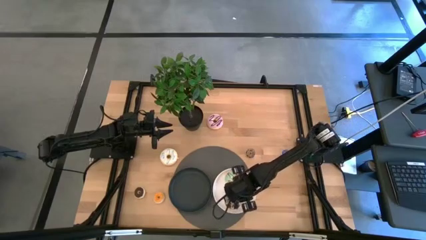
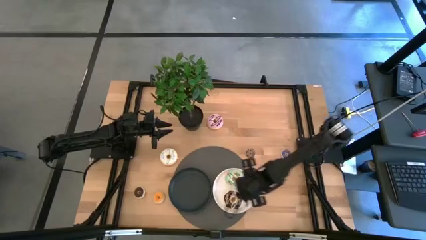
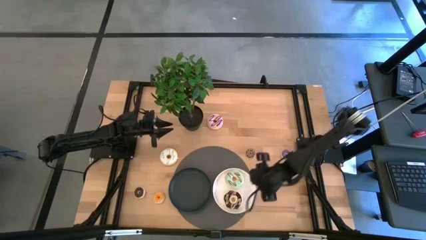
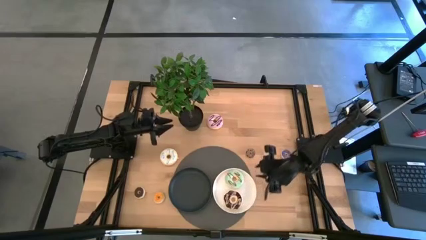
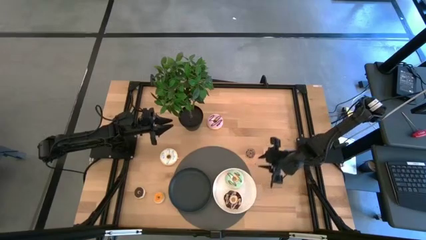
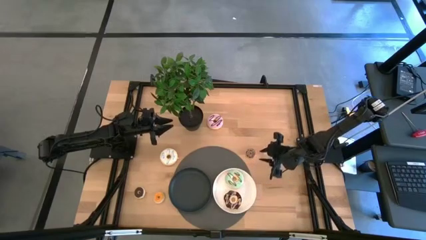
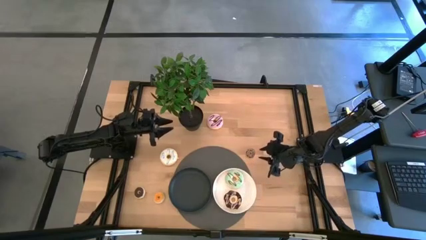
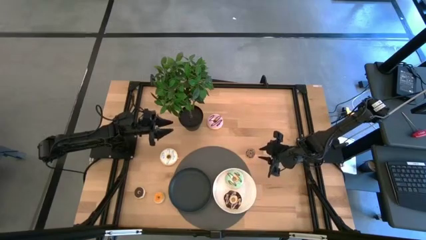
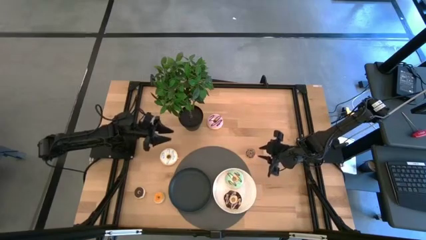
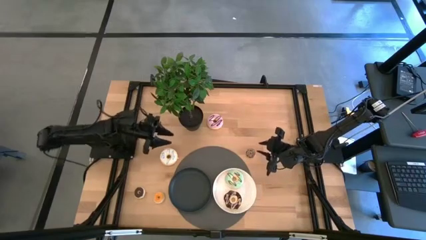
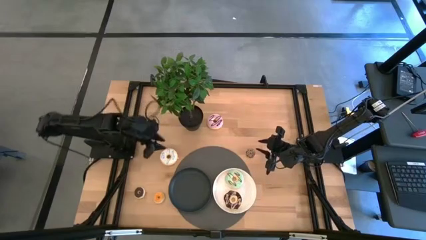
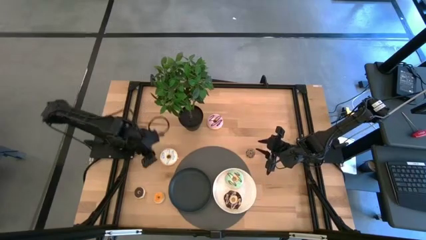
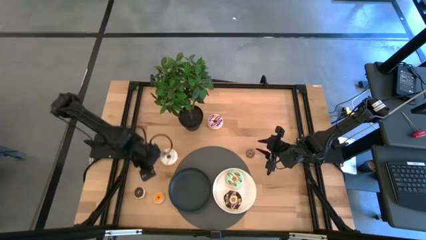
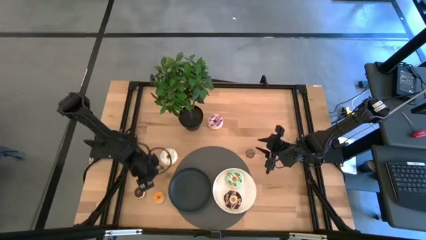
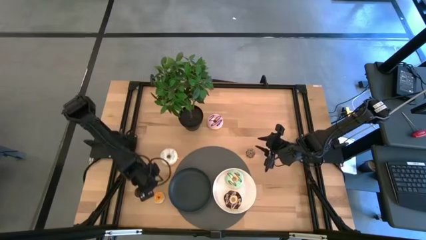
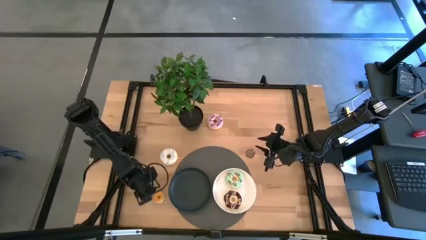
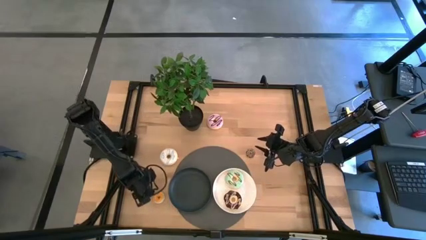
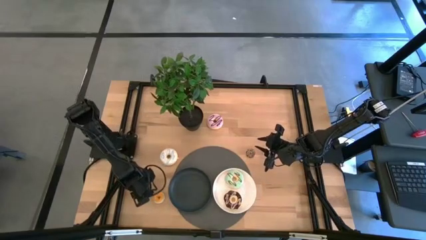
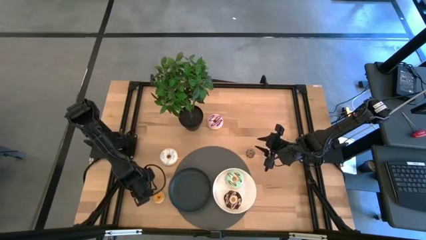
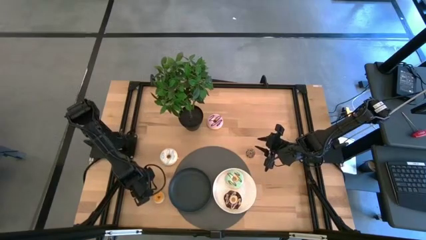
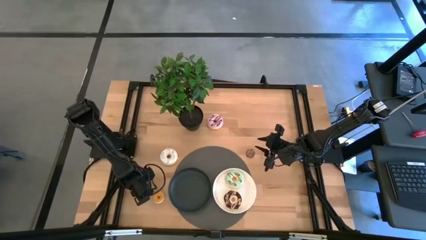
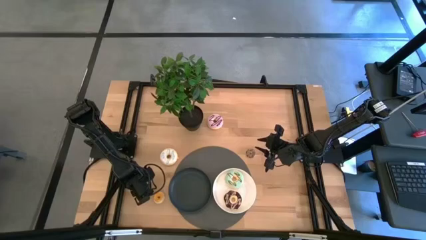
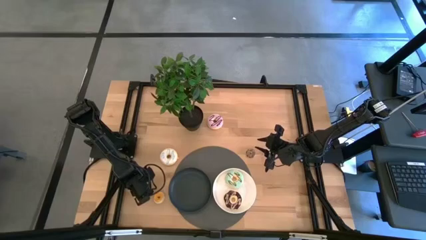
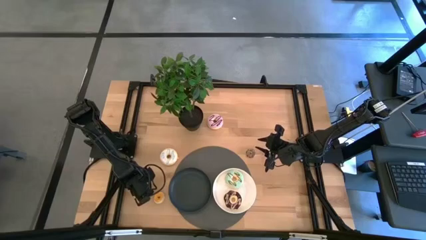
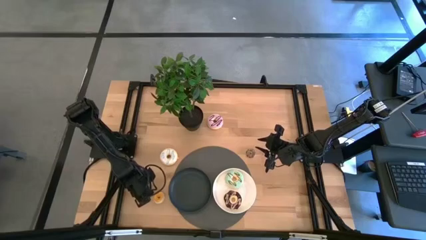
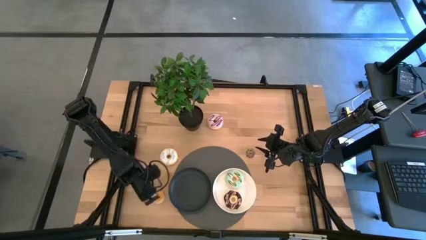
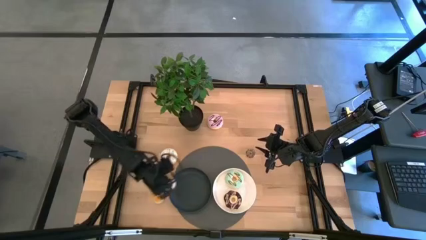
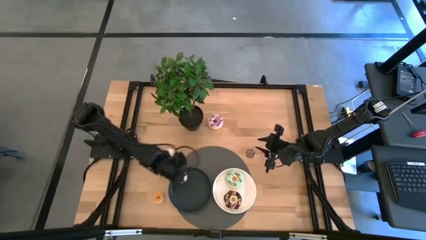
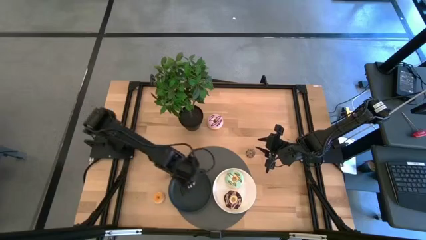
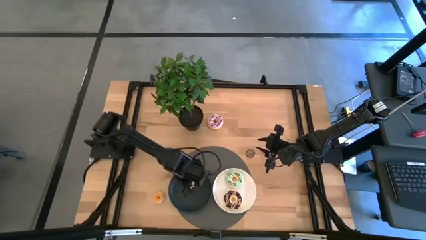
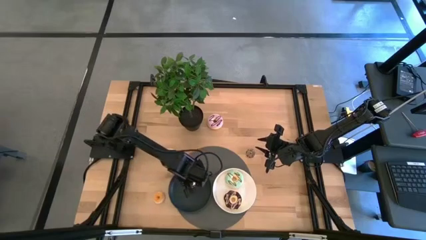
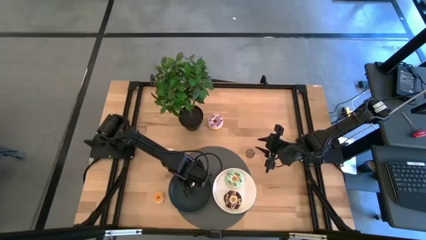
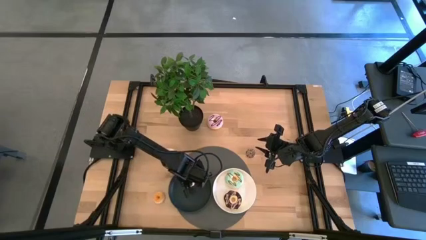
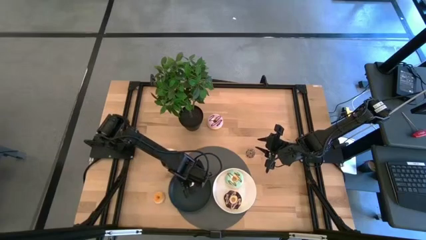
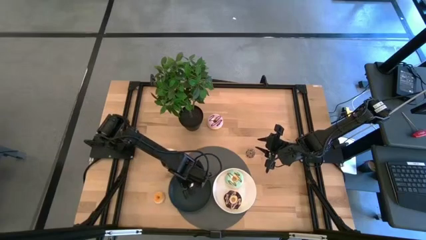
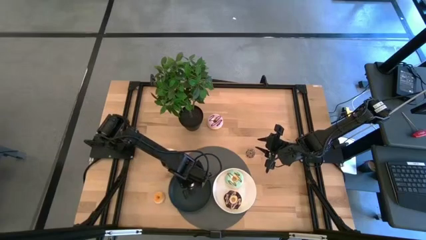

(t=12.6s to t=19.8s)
Task: Pick & Place donuts
Put the small brown donut into the black plate

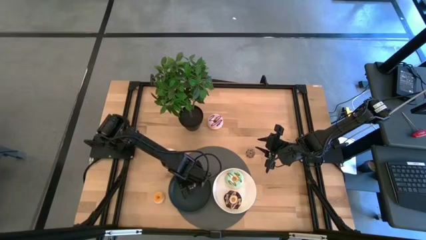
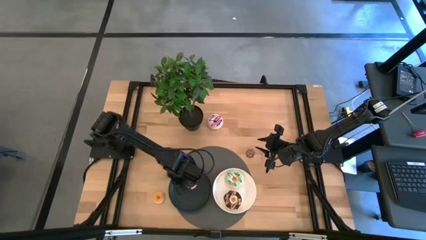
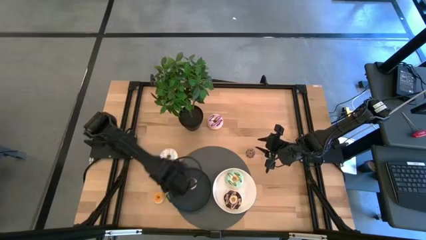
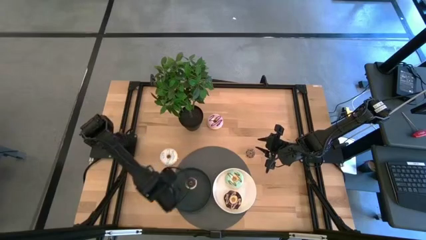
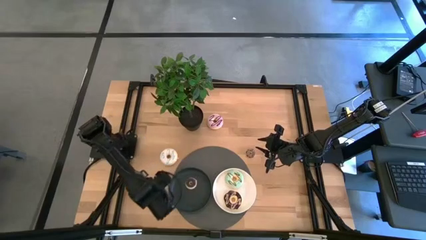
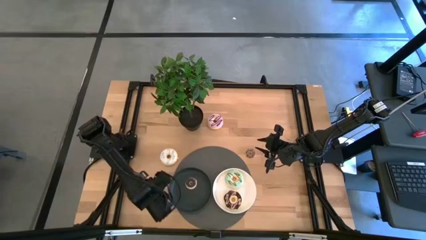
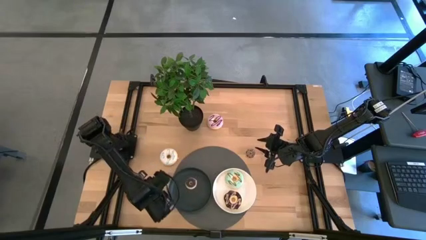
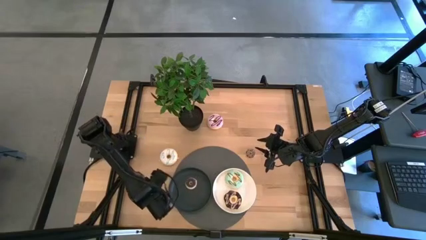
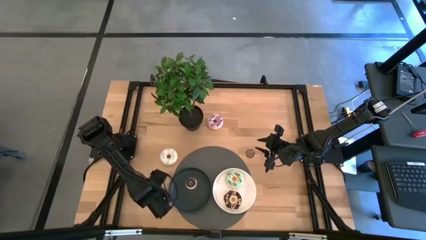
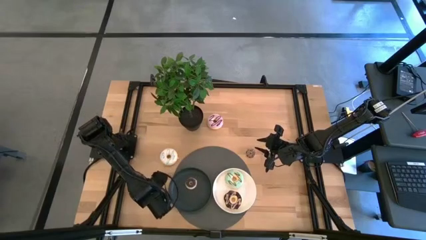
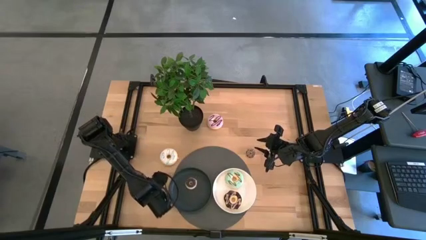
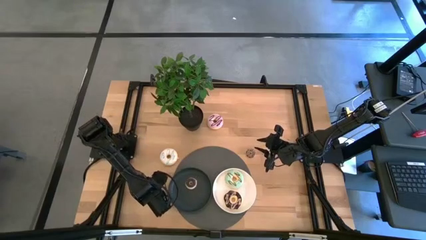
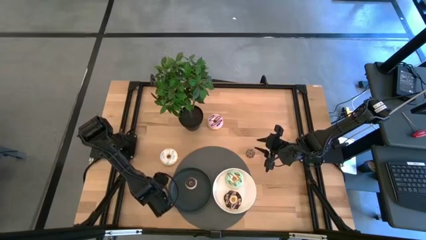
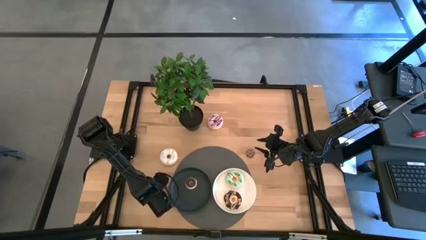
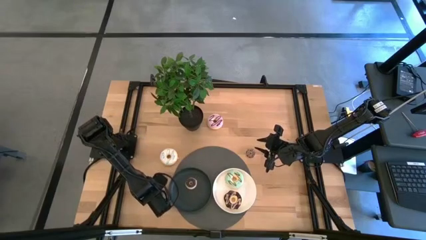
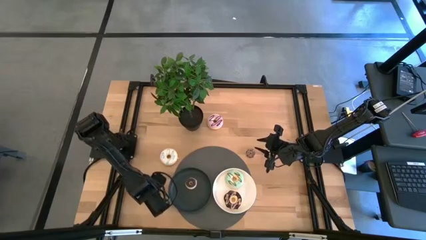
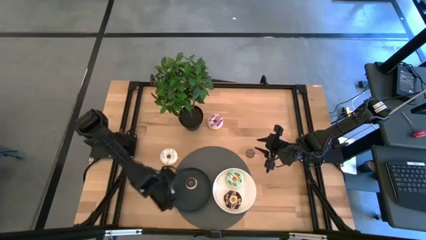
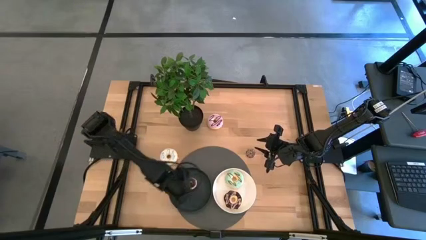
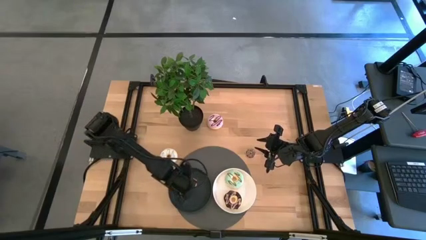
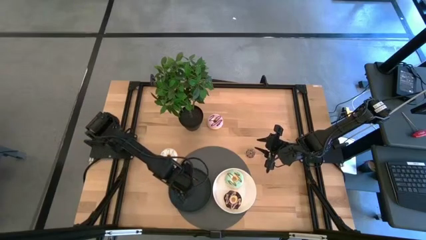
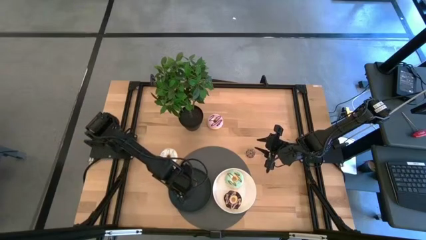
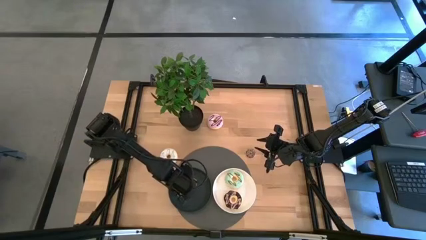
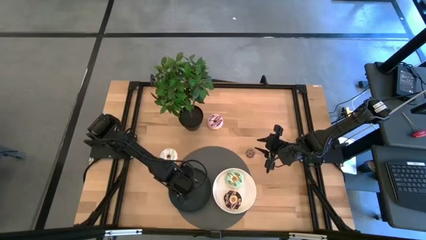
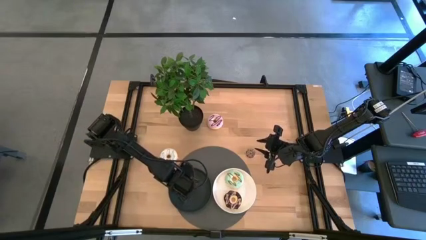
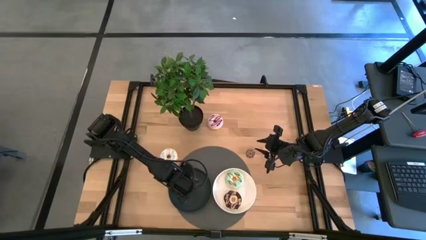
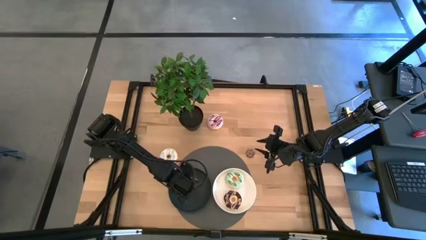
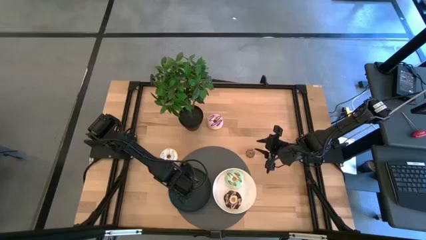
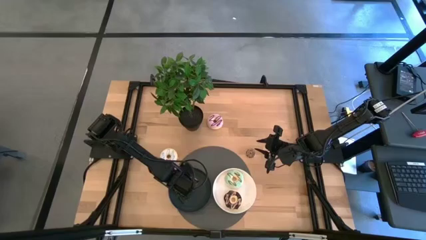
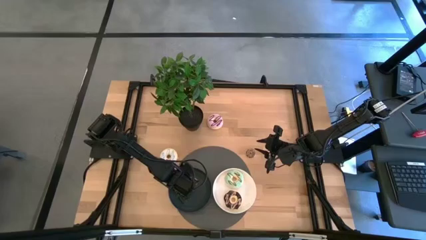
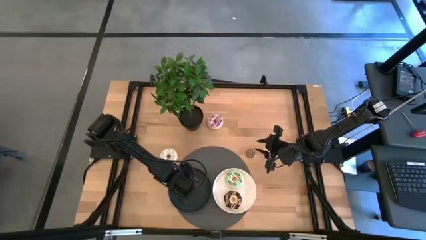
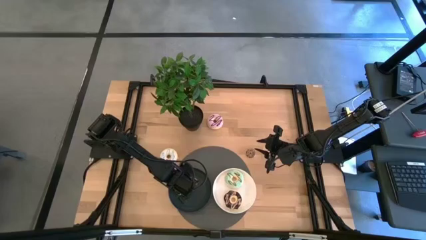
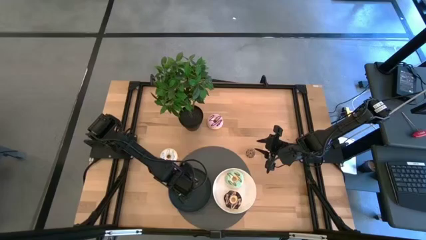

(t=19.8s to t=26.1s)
Put the small yellow donut into the black plate

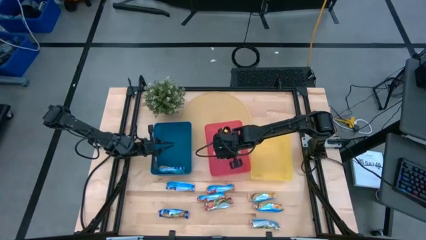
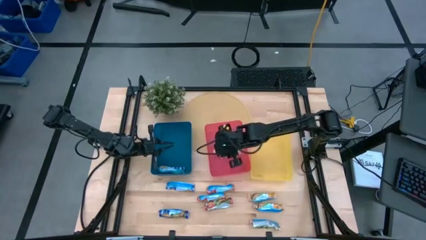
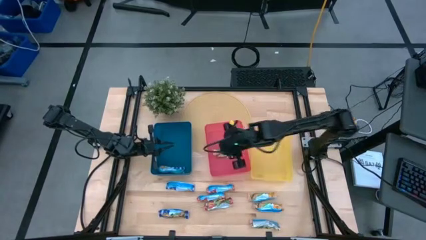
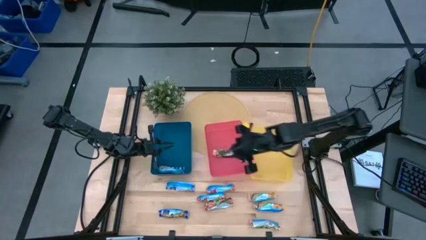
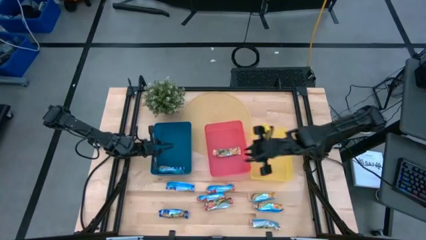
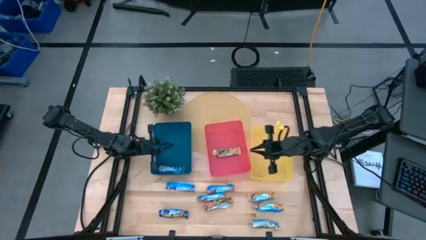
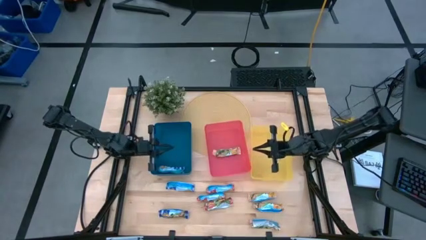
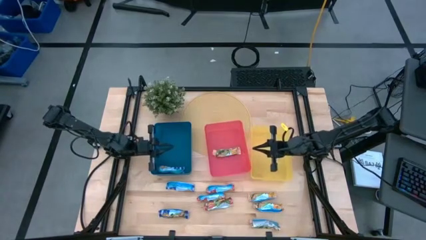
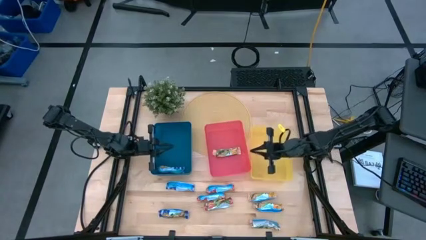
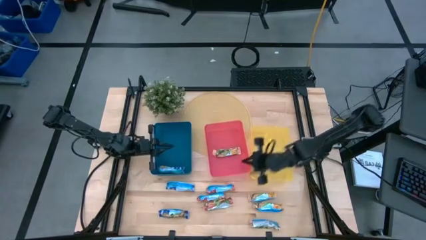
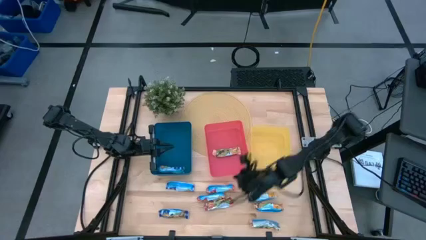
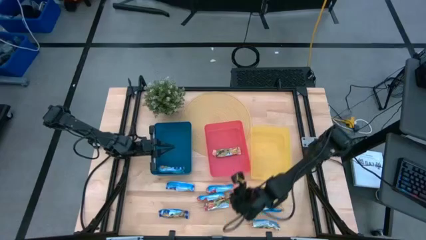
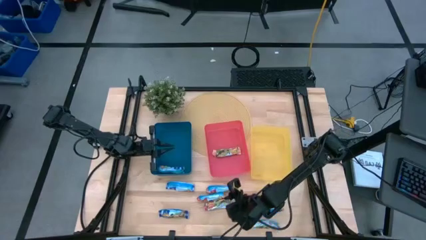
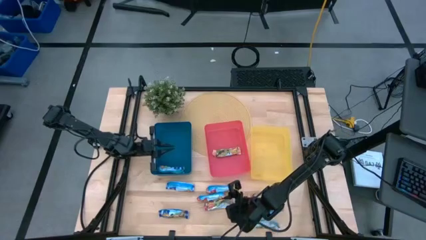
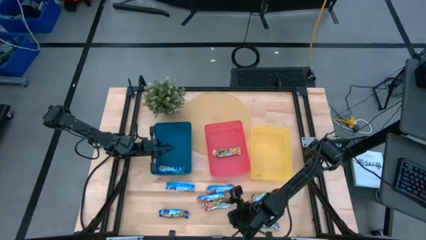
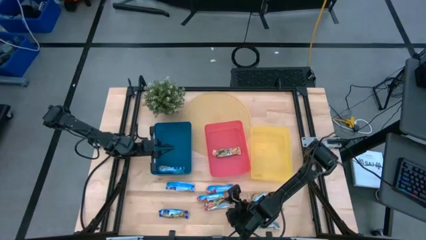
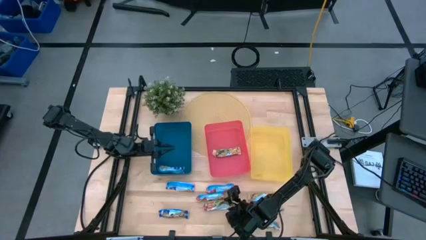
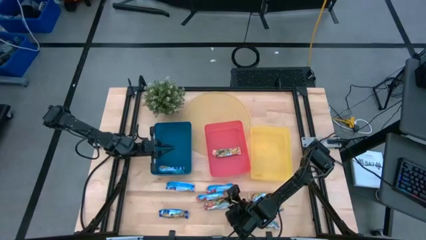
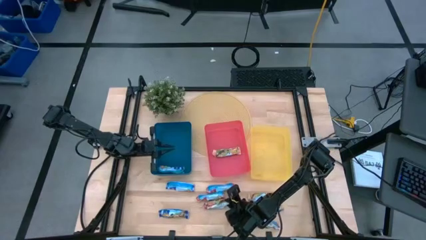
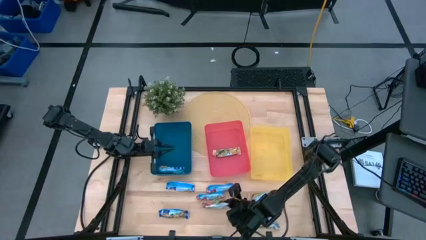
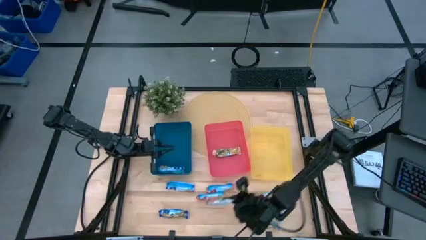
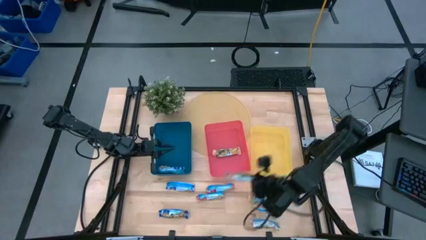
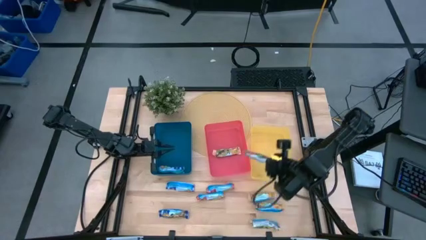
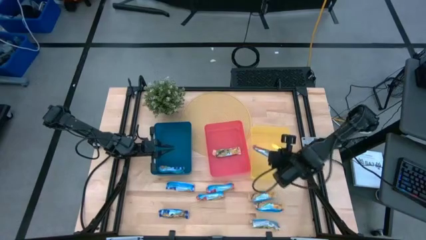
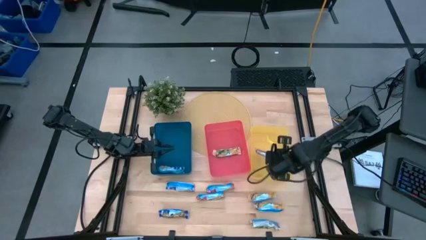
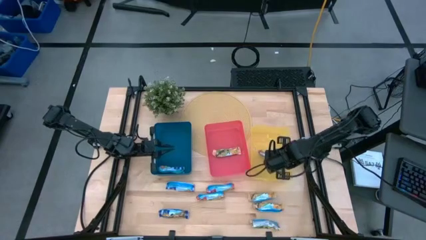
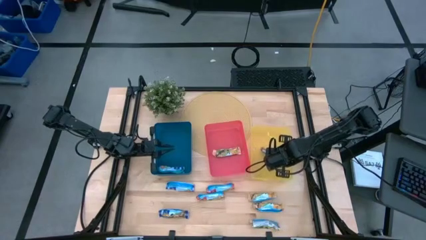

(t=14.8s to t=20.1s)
Task: Pick and place Granola Bars by type
Put the red granola bar into the yellow bin
